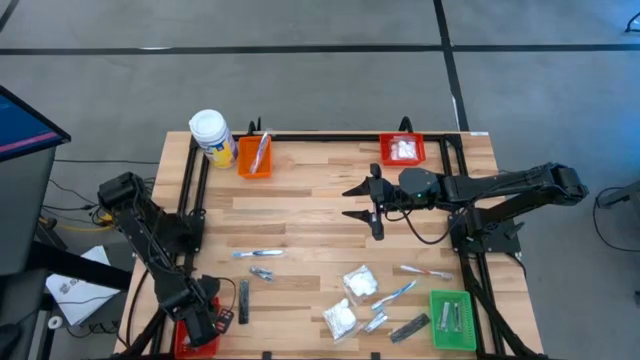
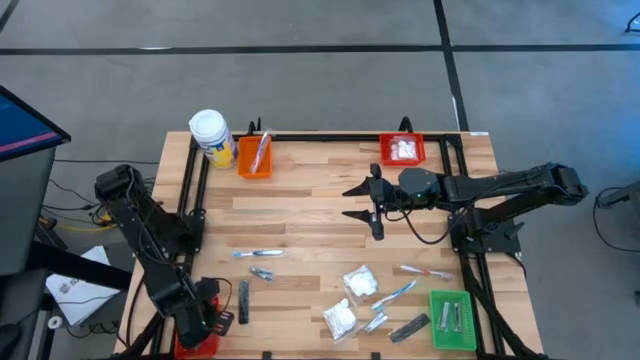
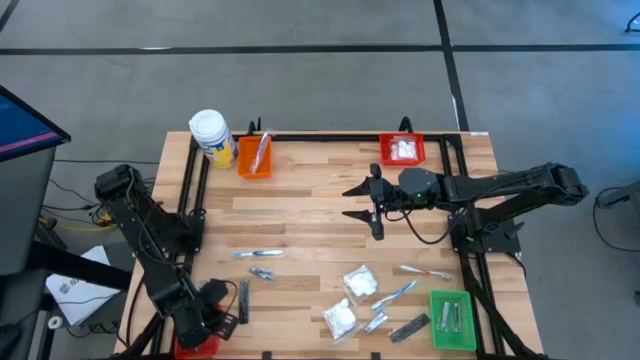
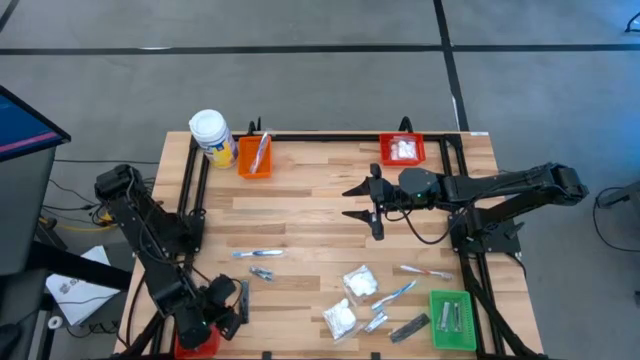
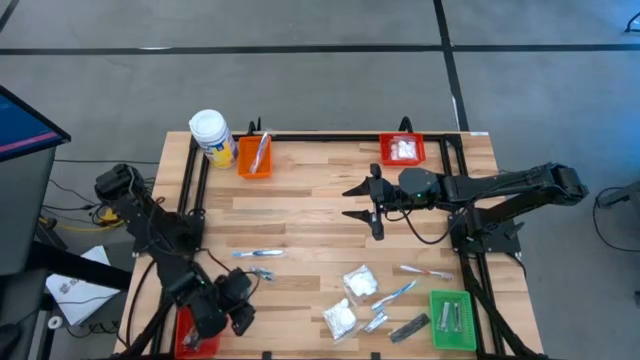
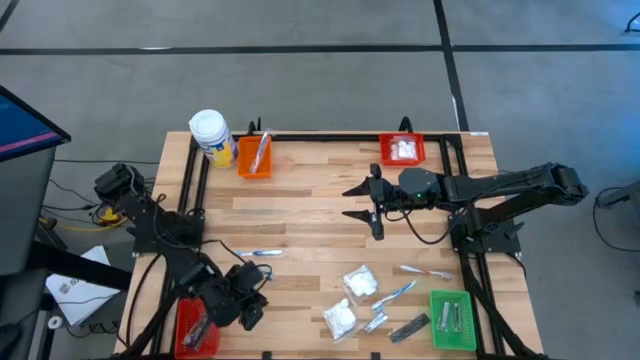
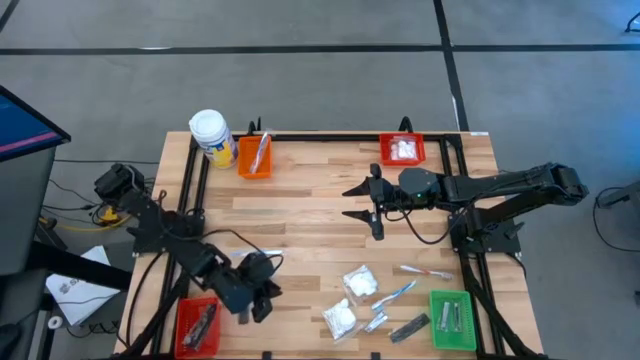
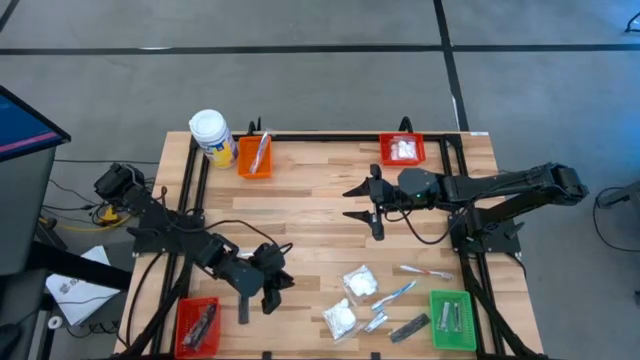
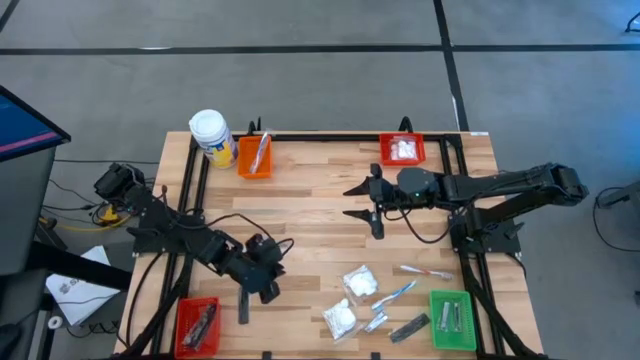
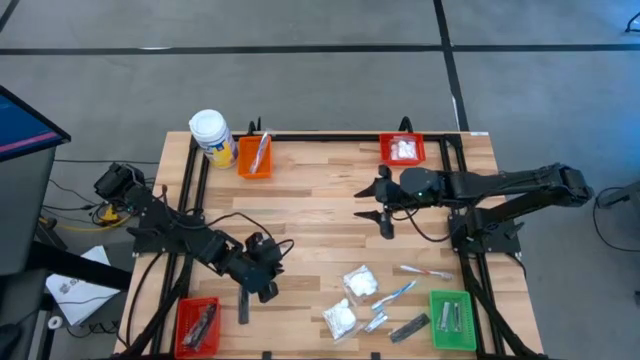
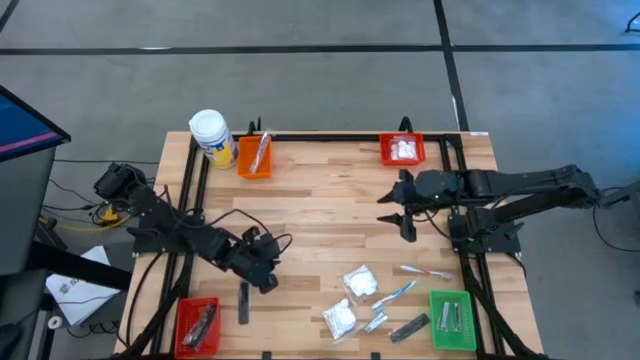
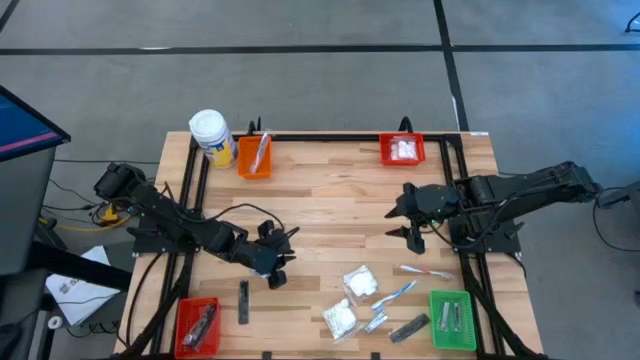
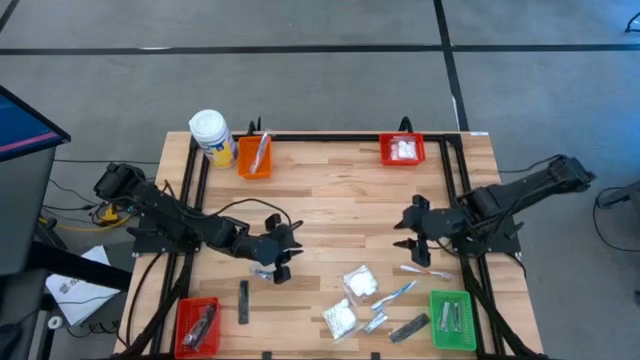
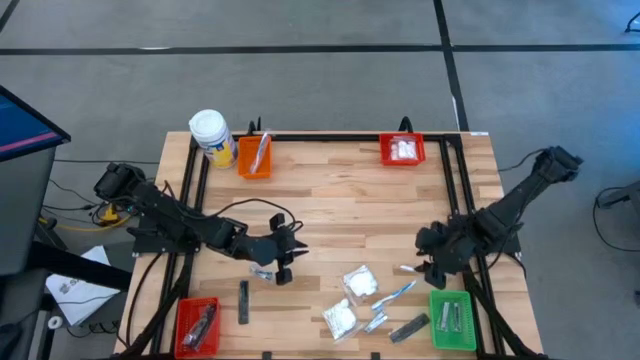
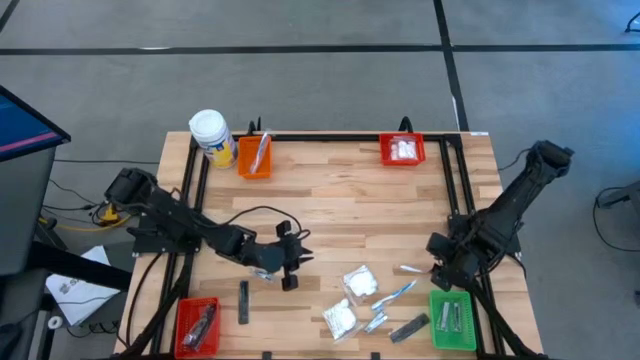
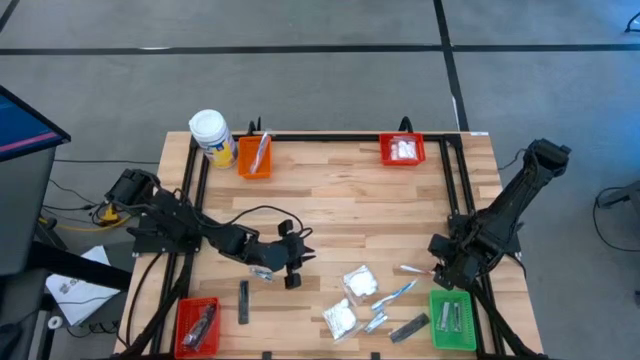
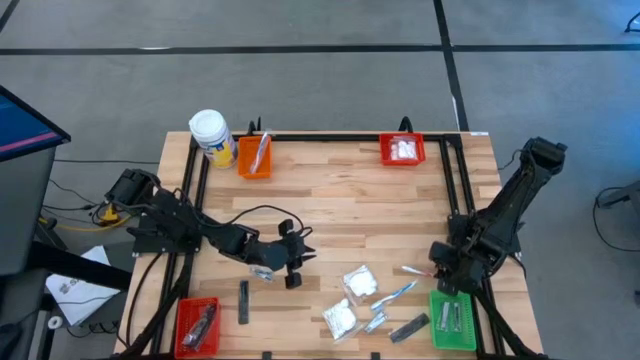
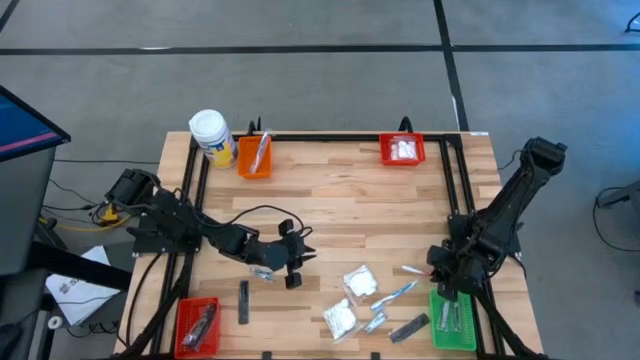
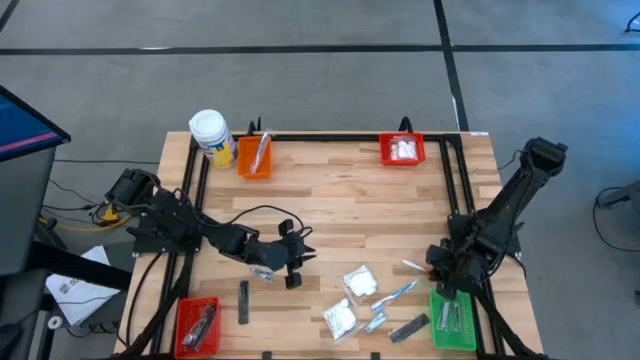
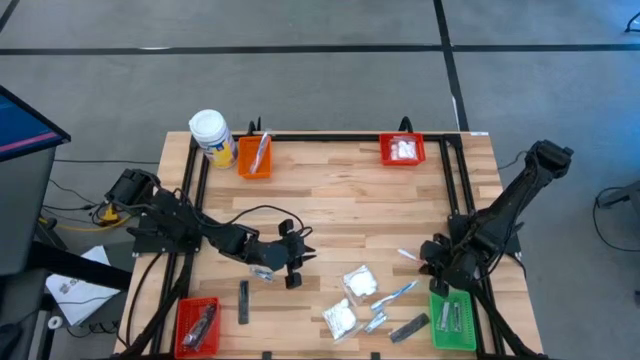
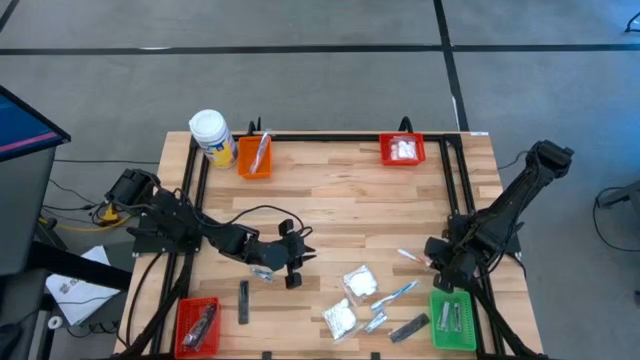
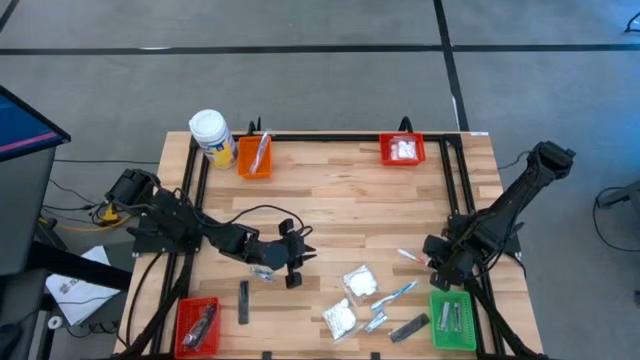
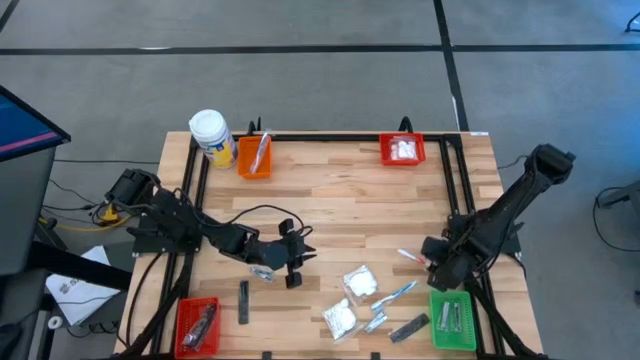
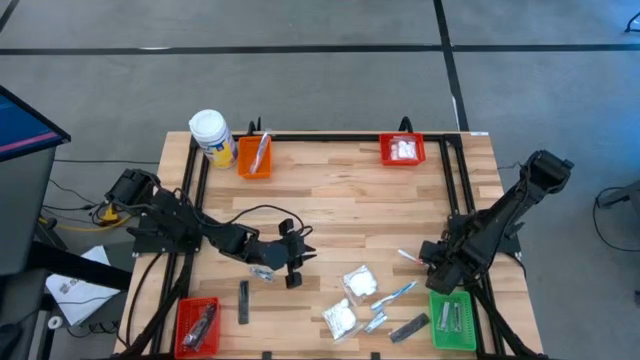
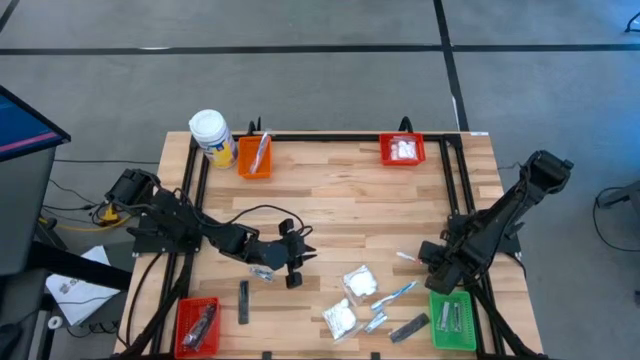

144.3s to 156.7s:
Task: Pick & Place Travel size toiletries
Put the right red toothbrush into the orange bin

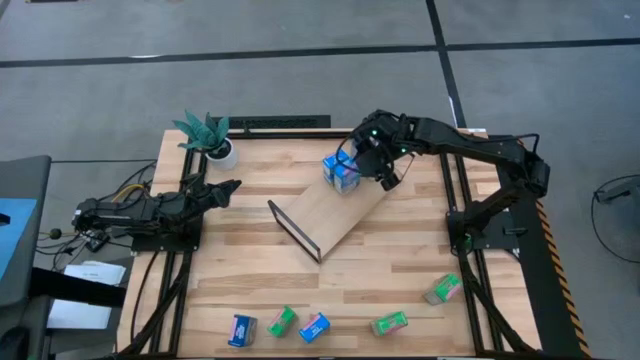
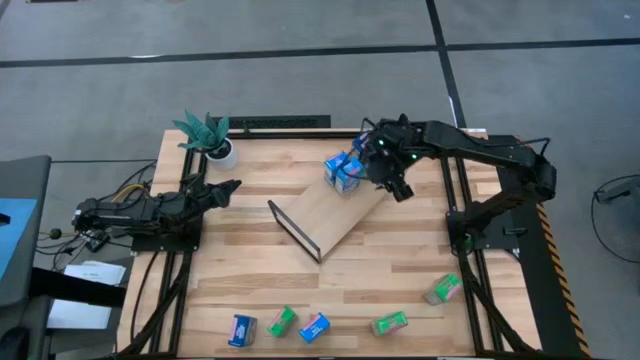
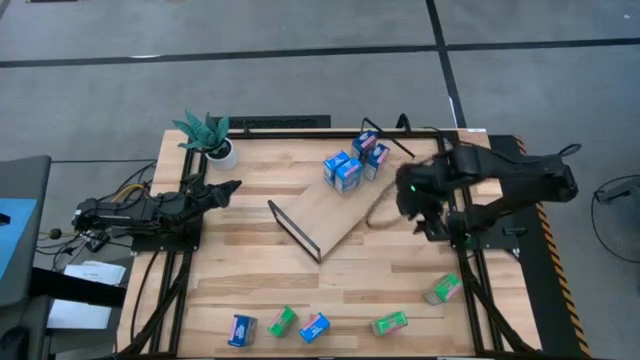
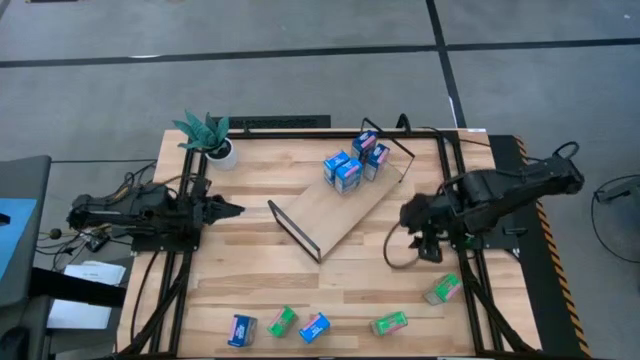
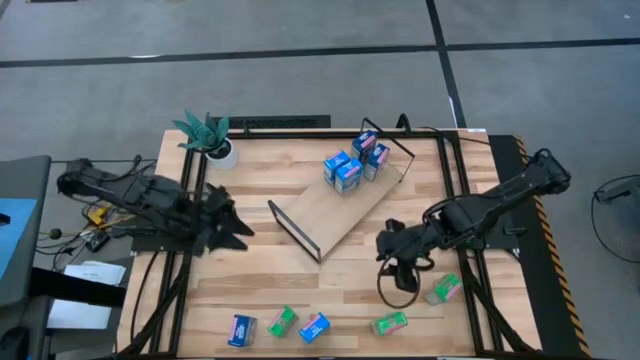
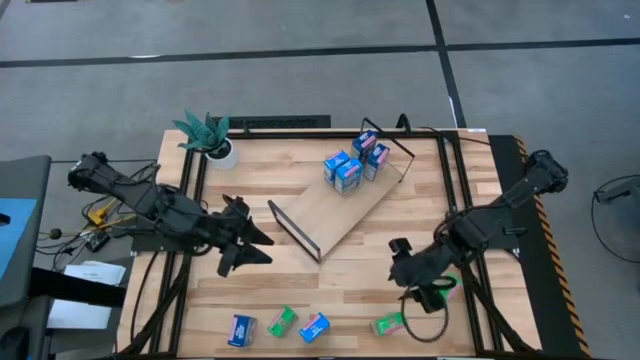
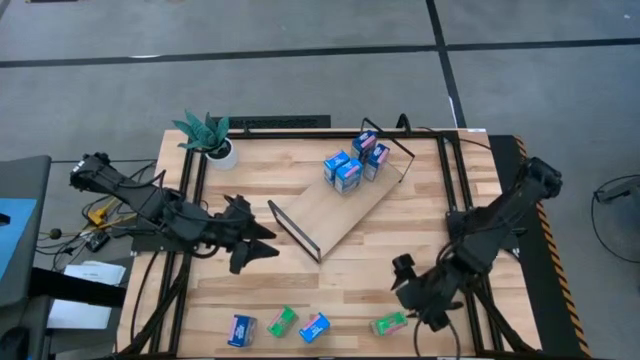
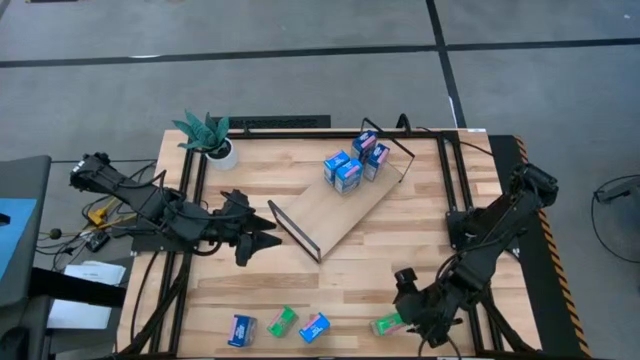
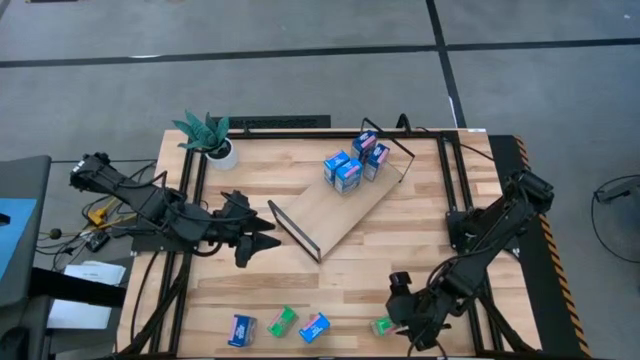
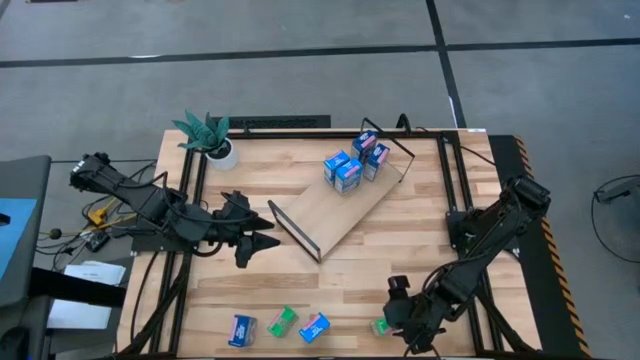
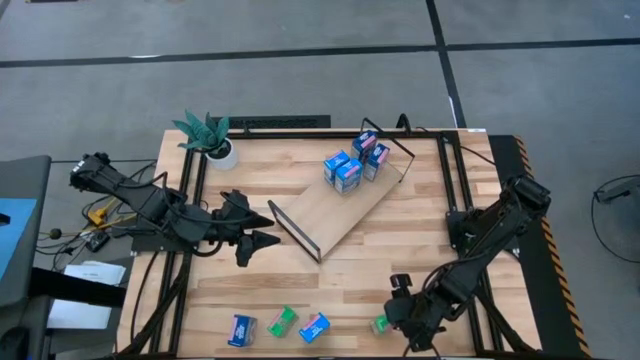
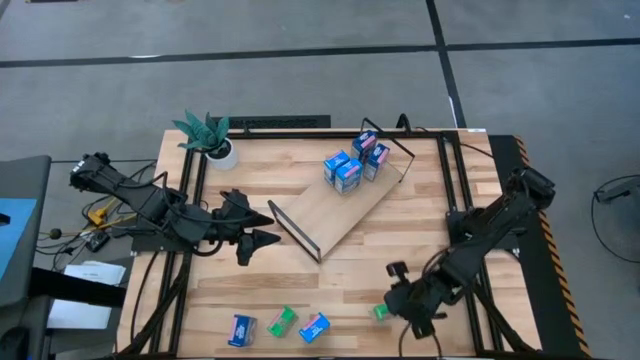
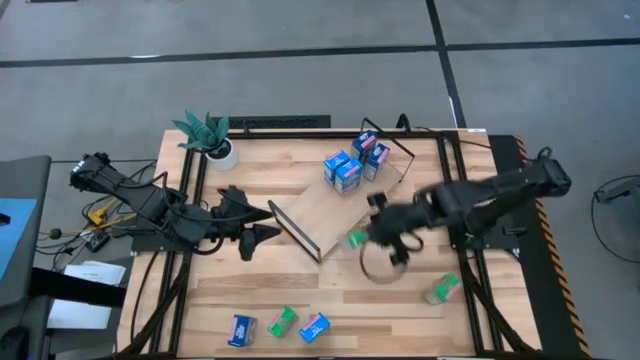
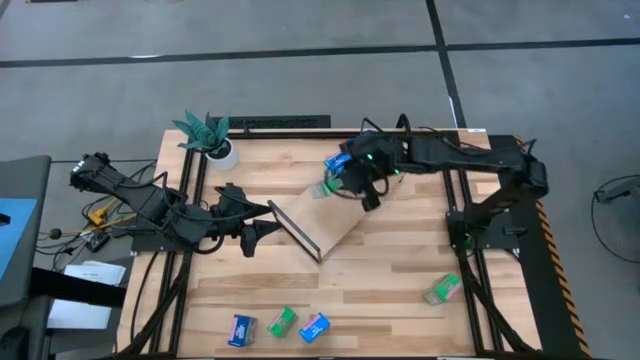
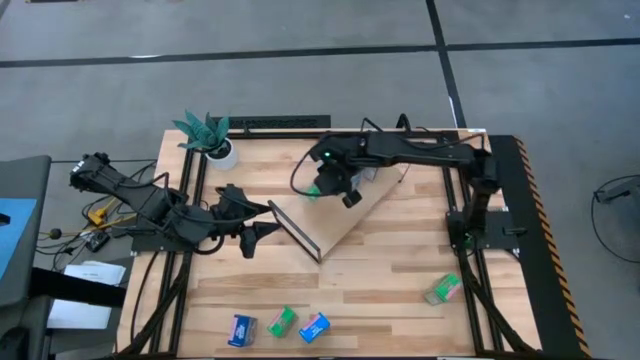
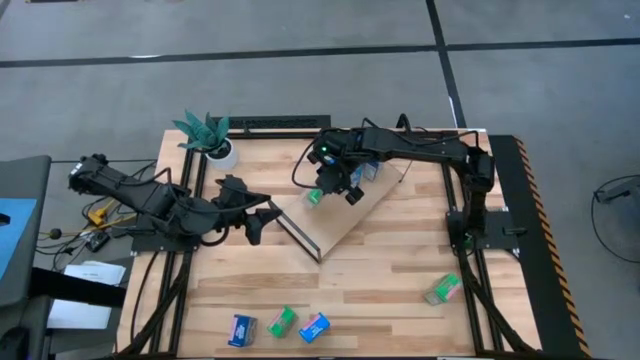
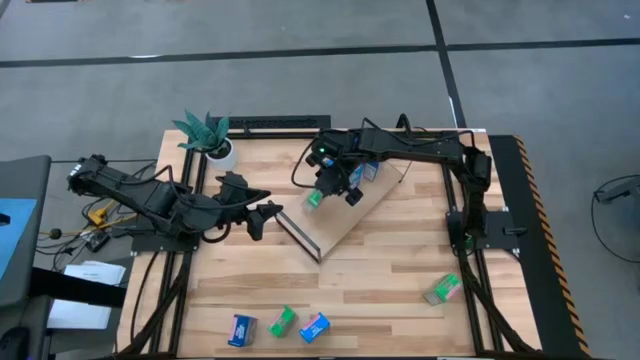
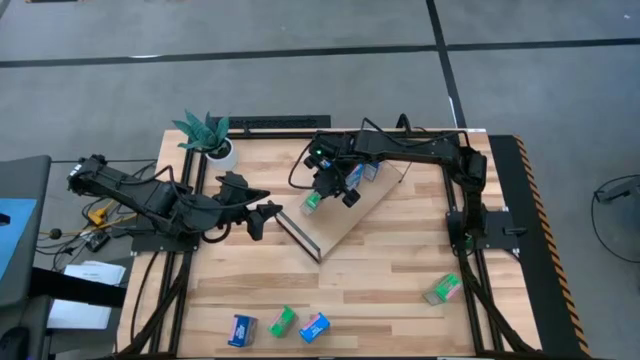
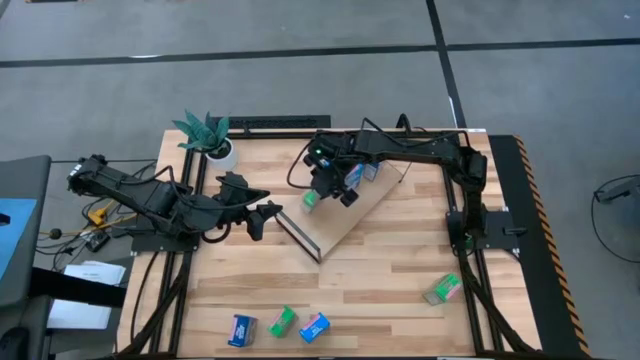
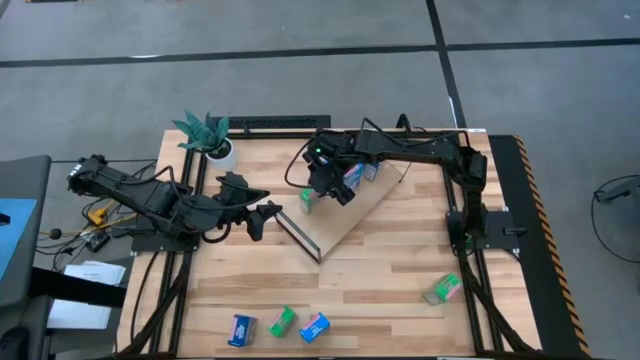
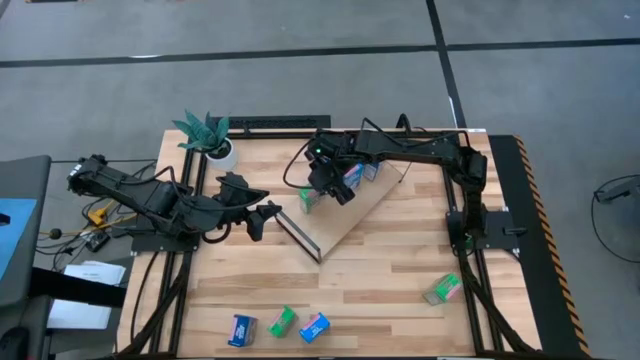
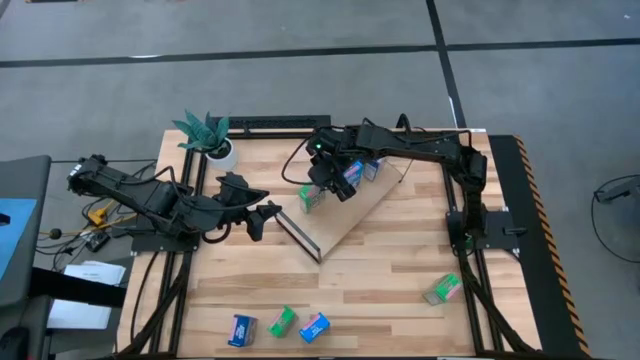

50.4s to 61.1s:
Task: Stack cereal on shelf
Put the middle green cereal box on the shelf
